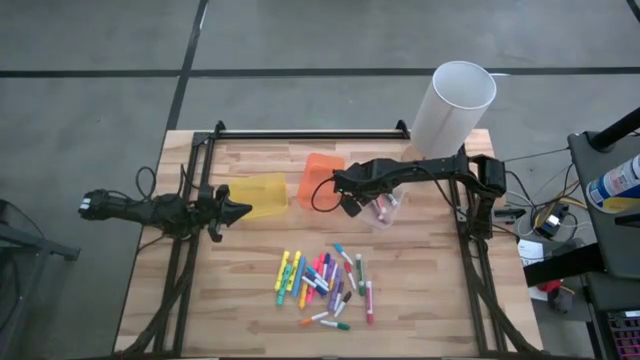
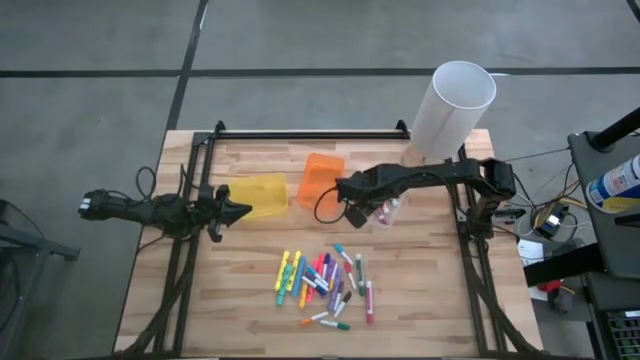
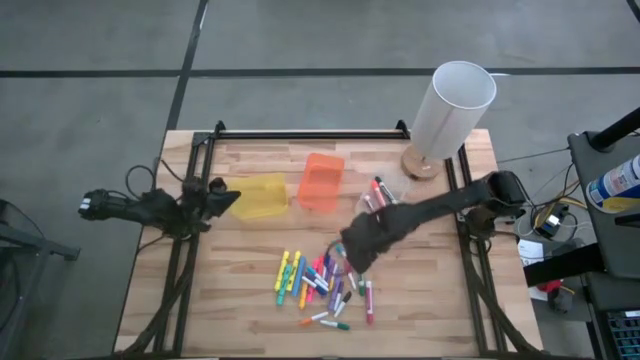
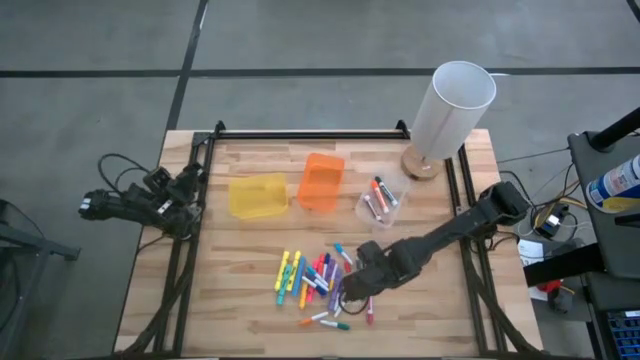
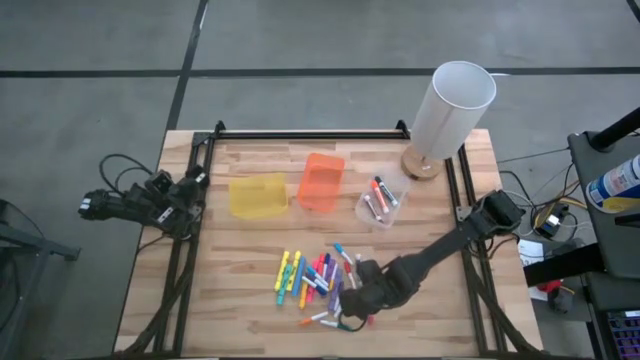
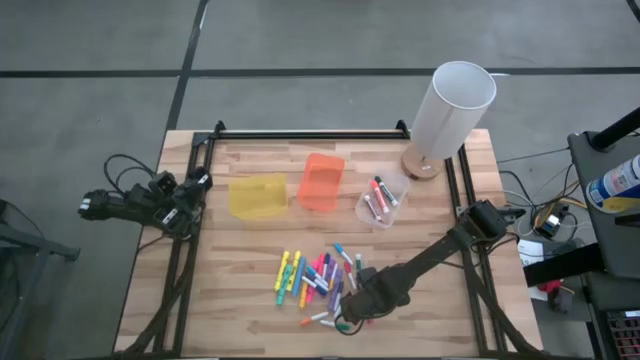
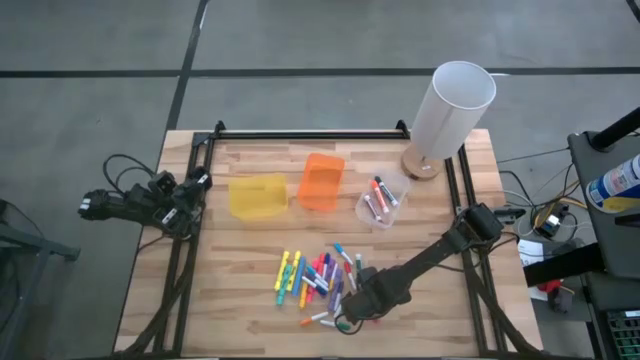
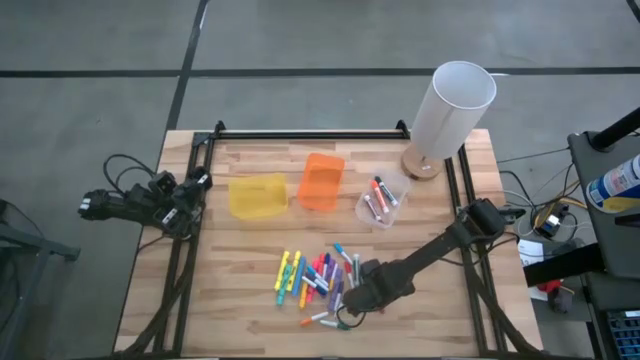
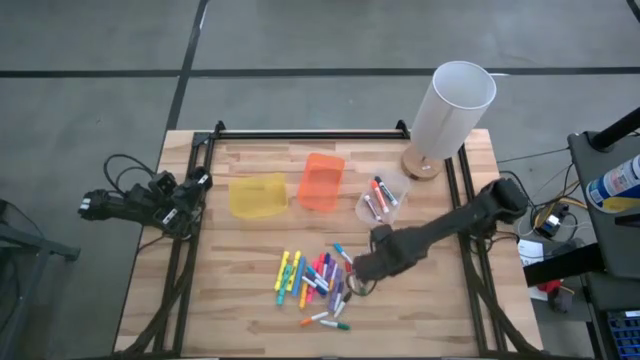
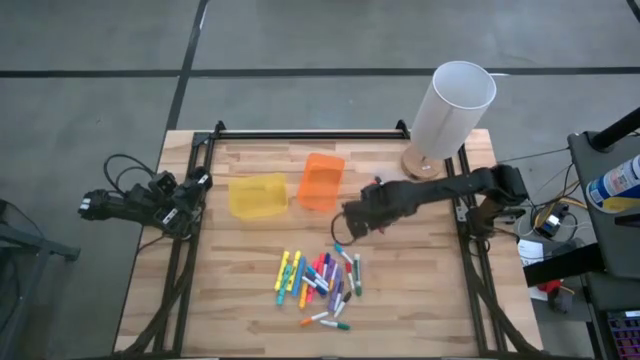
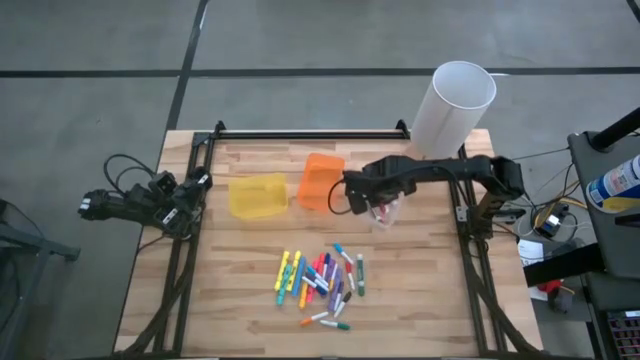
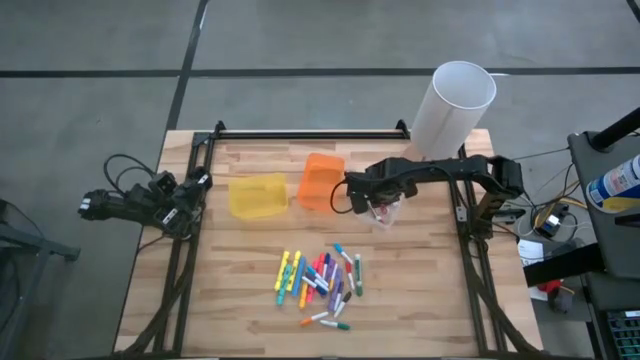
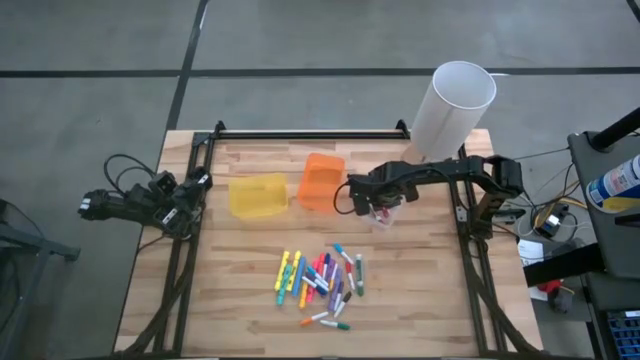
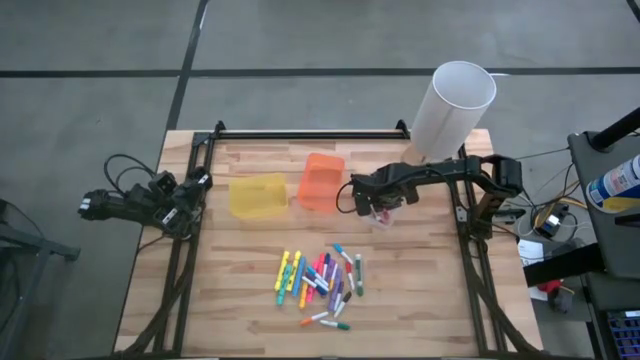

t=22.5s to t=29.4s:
Task: Pick & Place Markers
Put the pink marker pen into the transparent bin

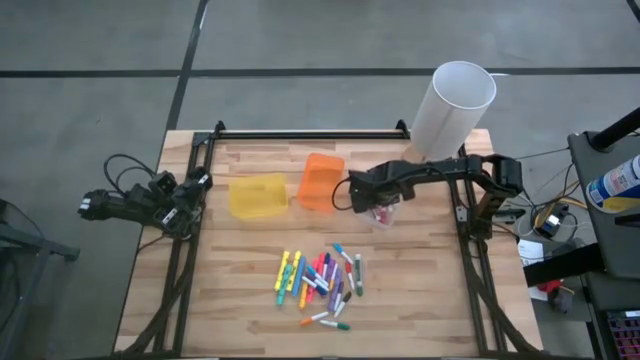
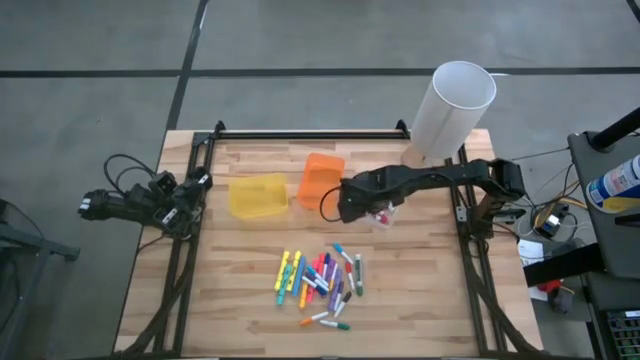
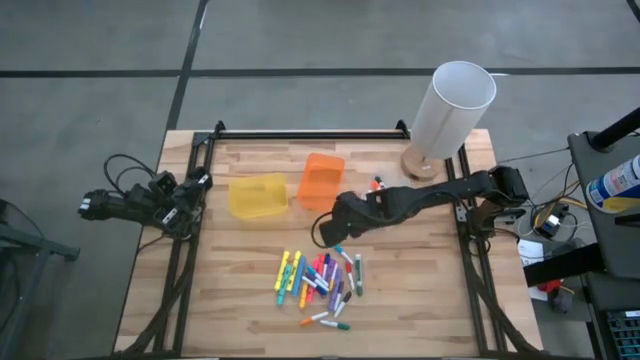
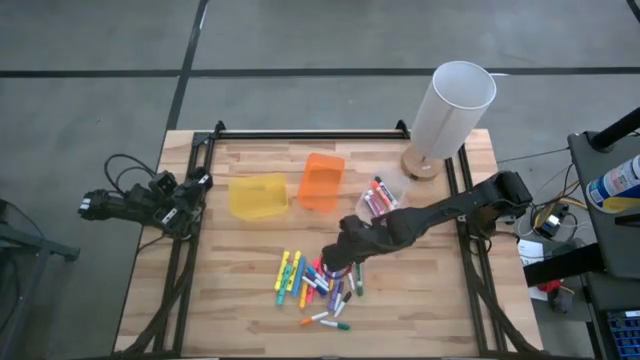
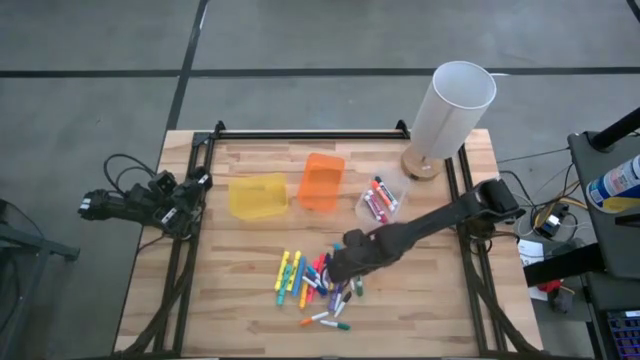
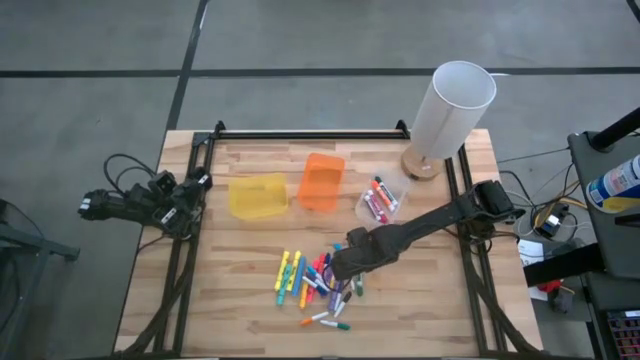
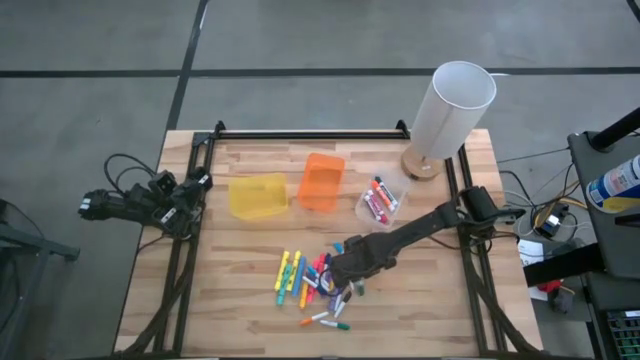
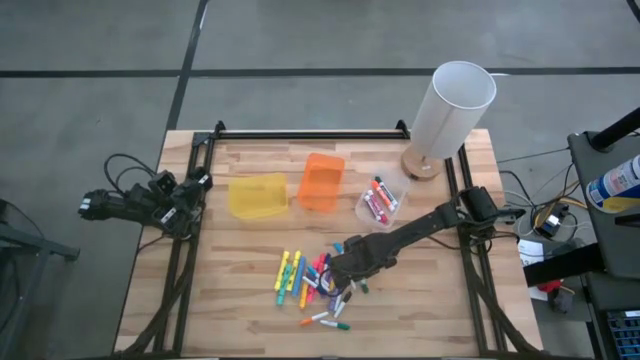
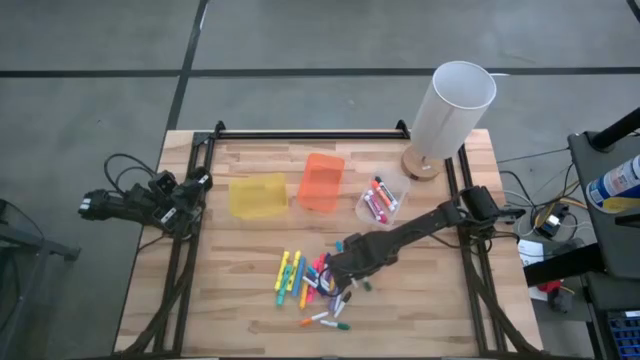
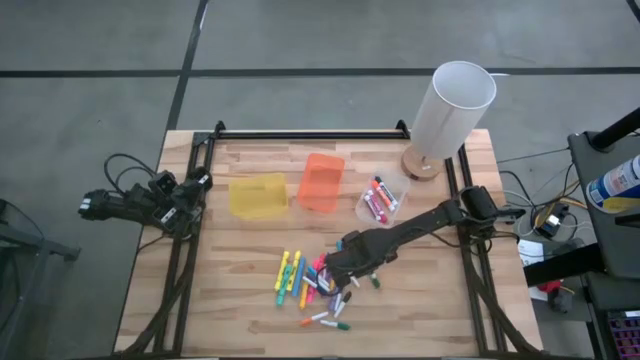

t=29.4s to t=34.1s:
Put the green marker pen into the transparent bin

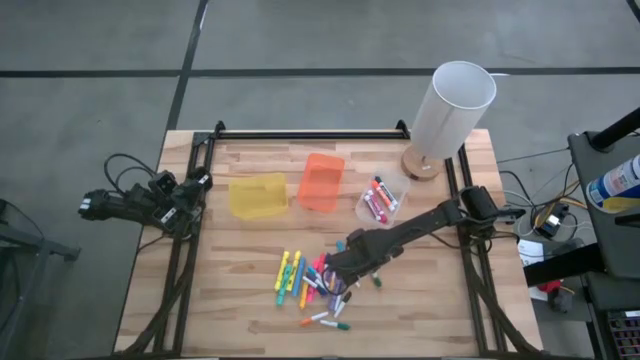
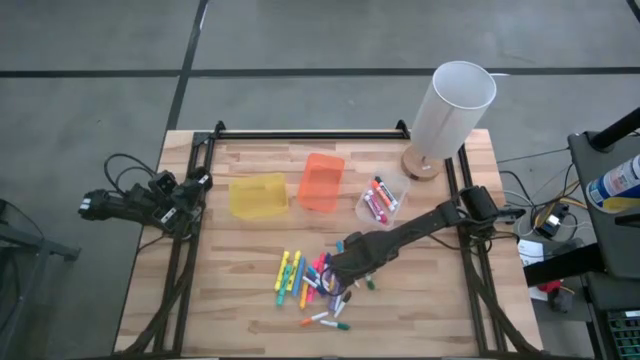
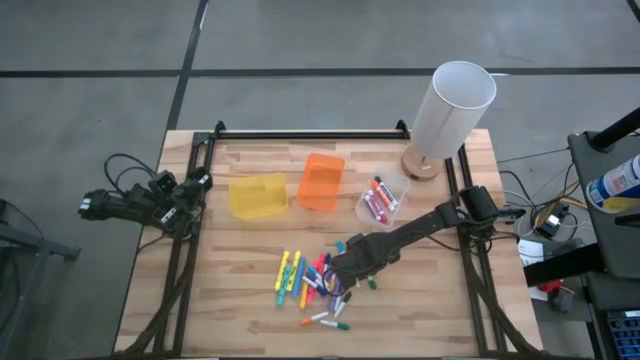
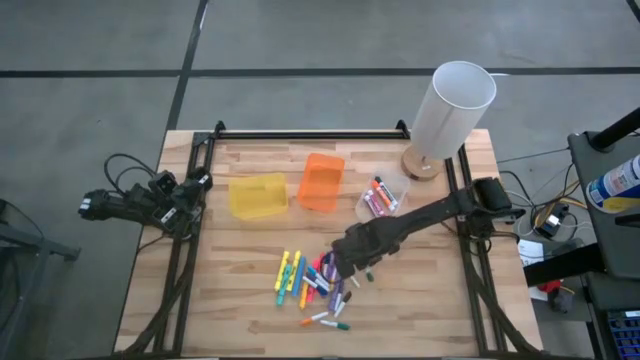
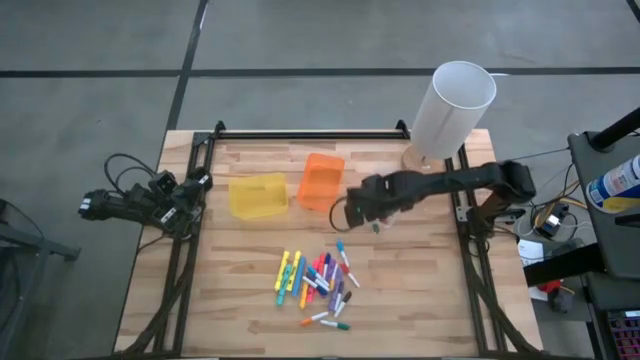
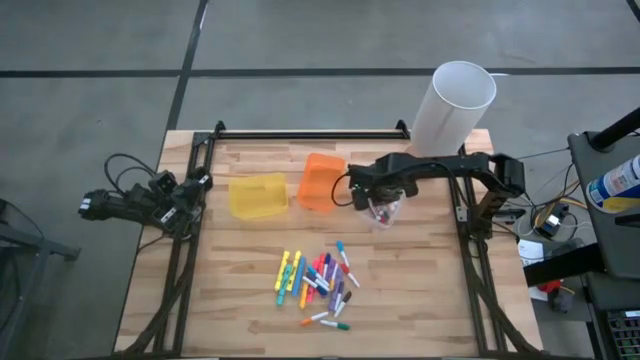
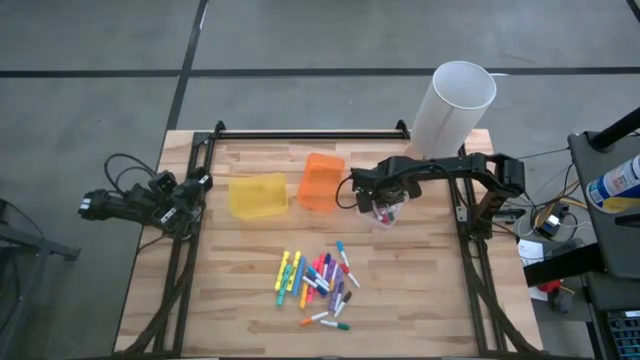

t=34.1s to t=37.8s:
Put the green marker pen into the transparent bin

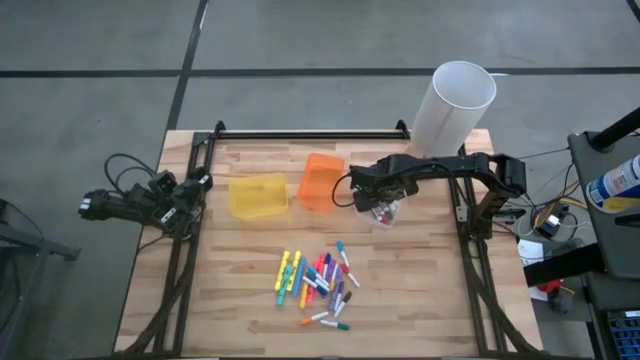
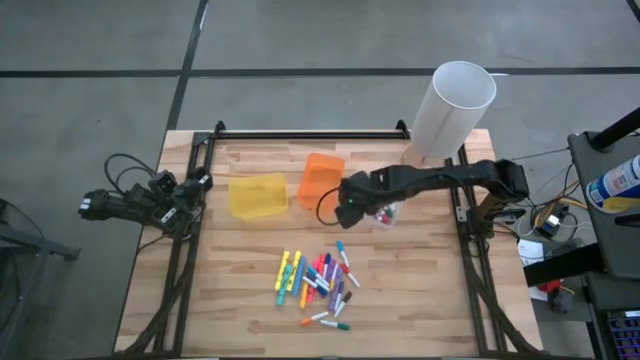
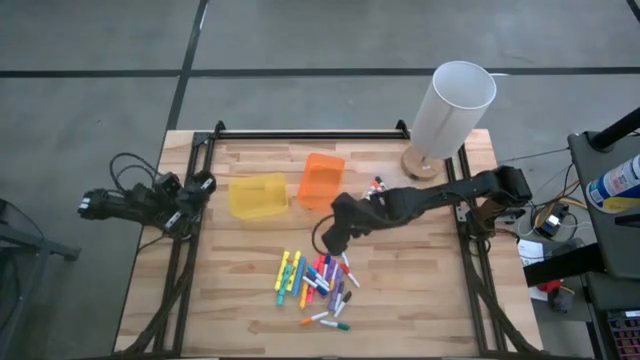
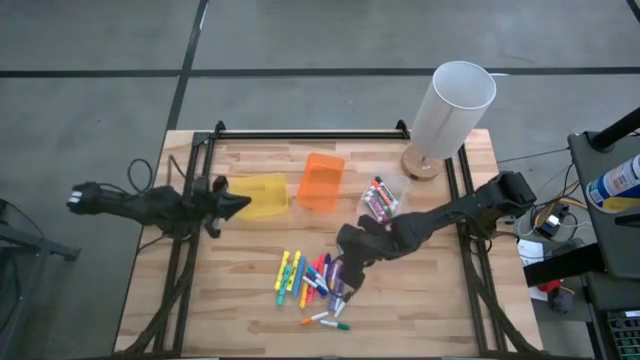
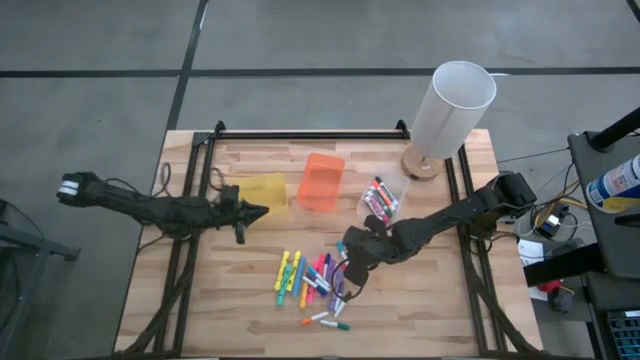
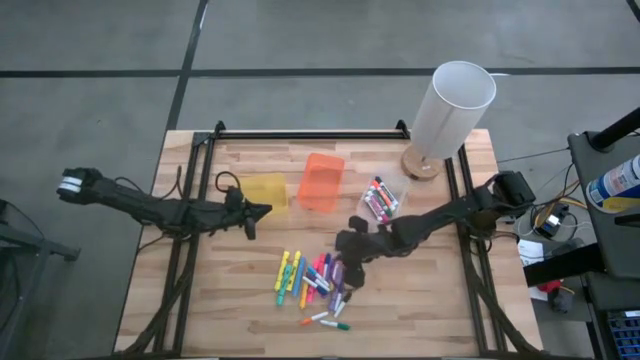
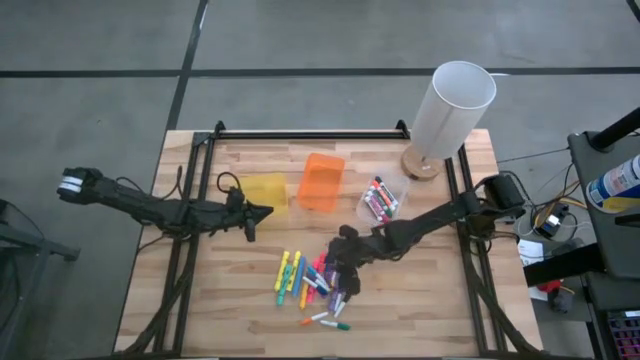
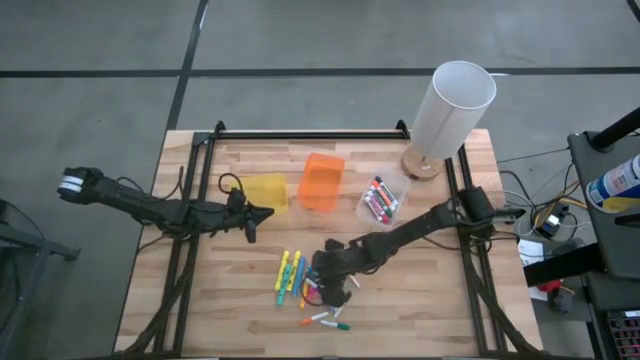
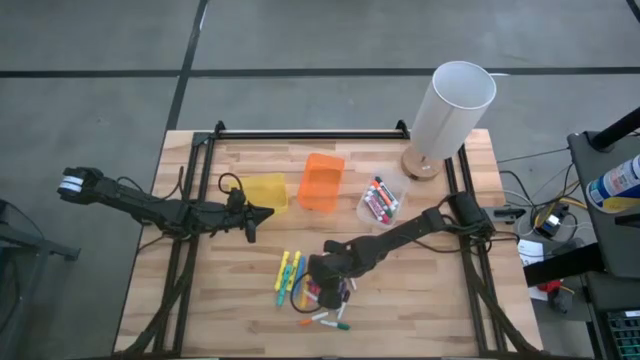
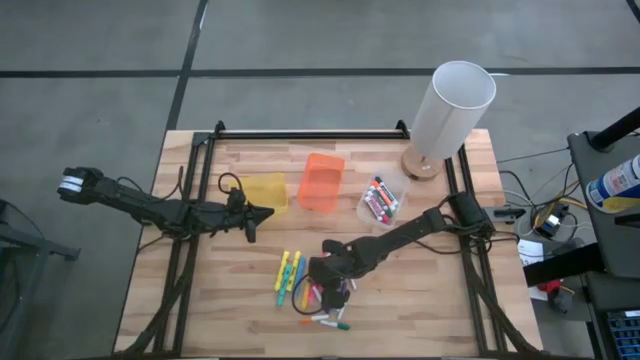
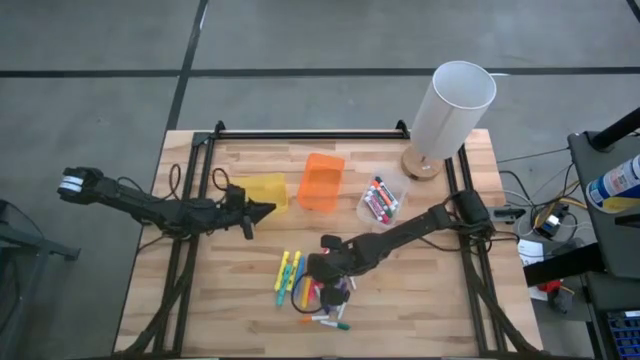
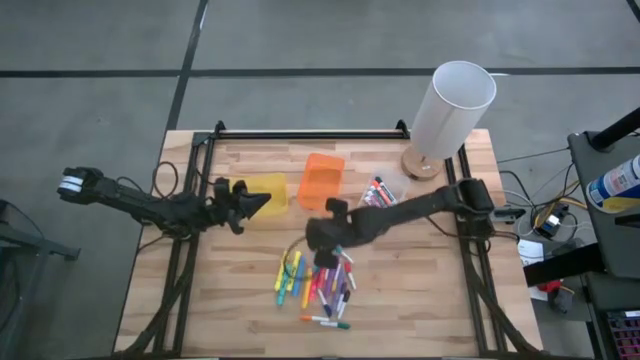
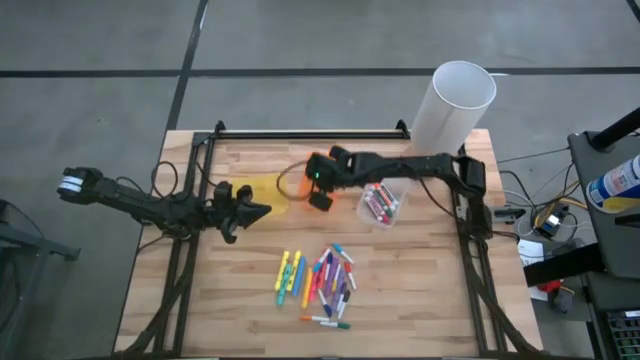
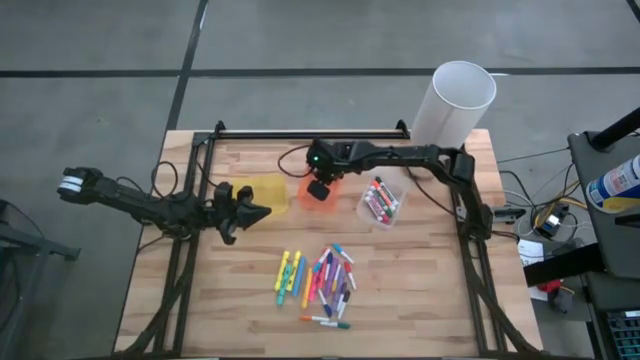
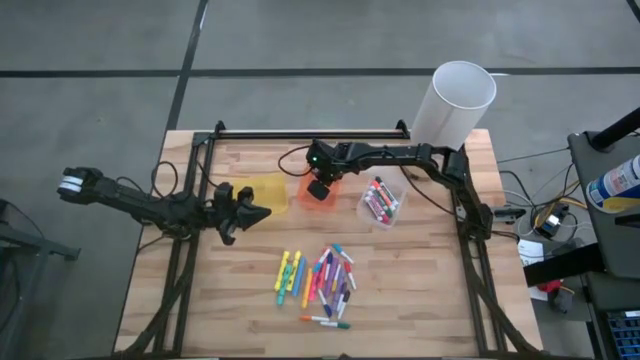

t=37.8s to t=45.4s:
Put the right violet pen into the orange bin
